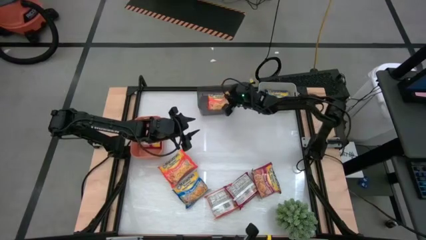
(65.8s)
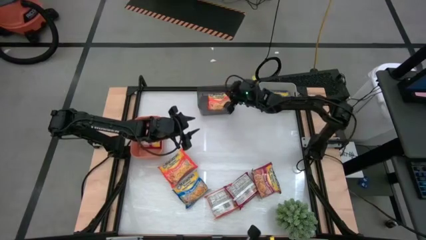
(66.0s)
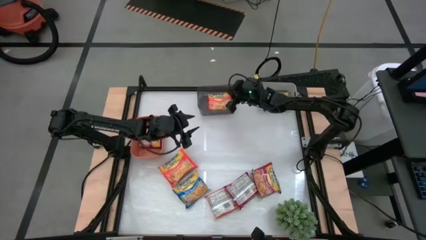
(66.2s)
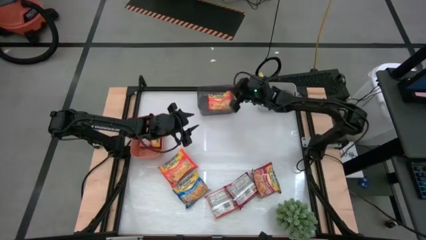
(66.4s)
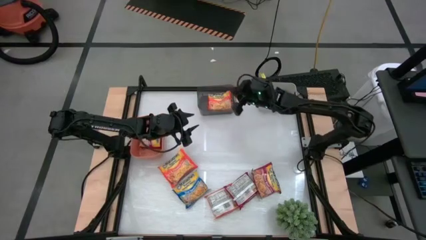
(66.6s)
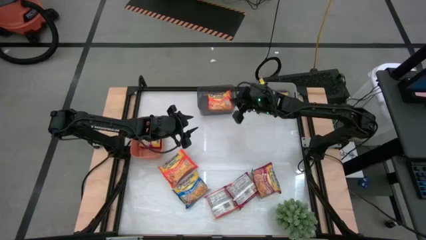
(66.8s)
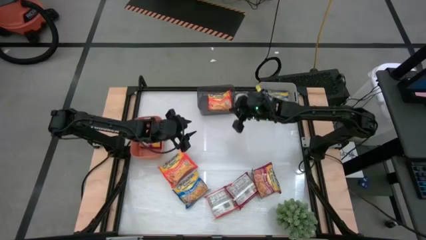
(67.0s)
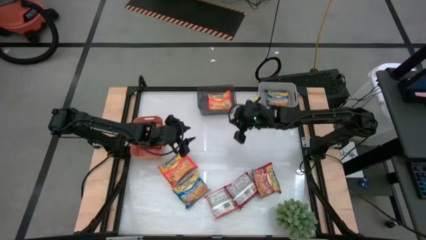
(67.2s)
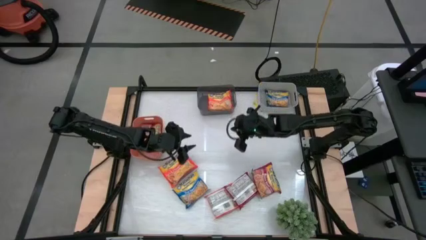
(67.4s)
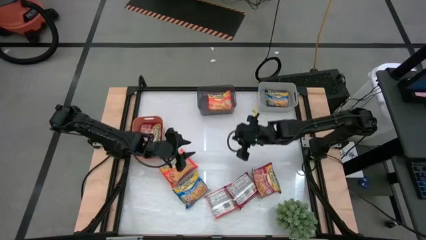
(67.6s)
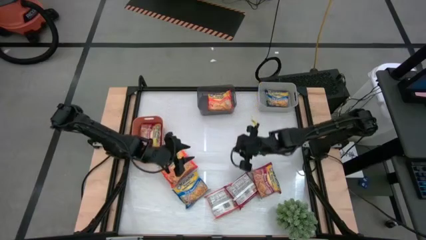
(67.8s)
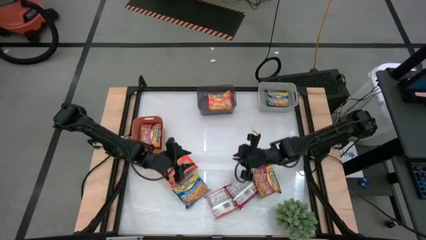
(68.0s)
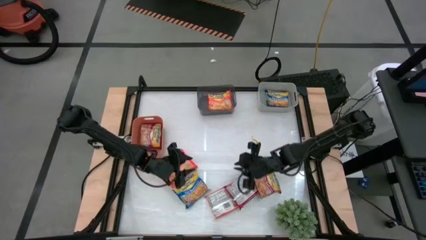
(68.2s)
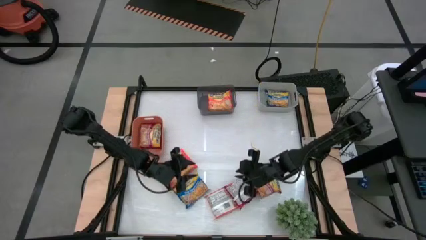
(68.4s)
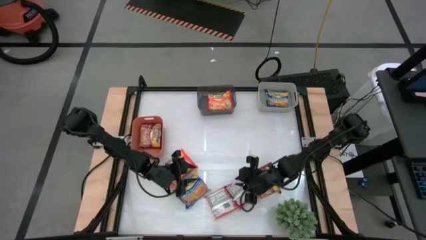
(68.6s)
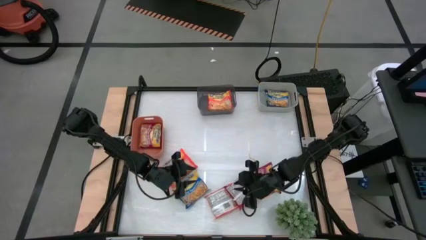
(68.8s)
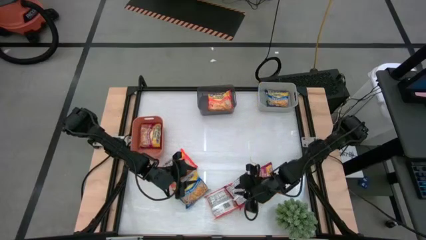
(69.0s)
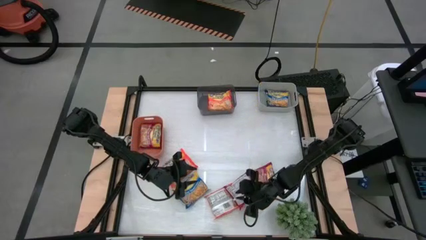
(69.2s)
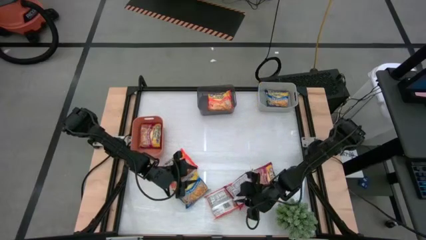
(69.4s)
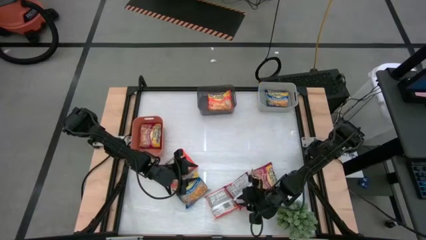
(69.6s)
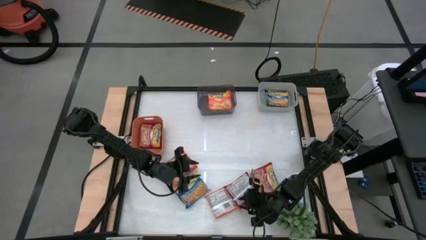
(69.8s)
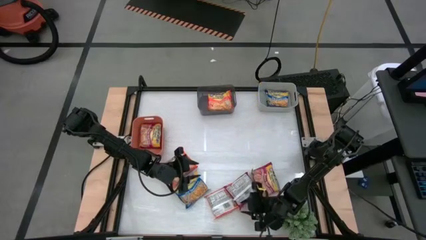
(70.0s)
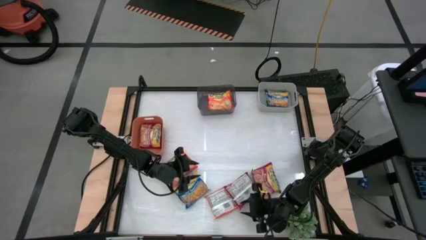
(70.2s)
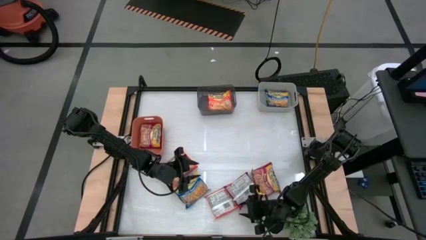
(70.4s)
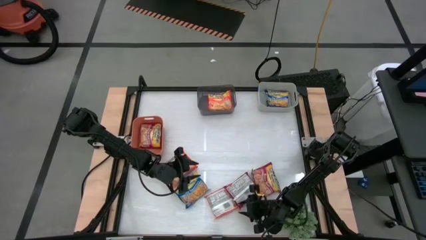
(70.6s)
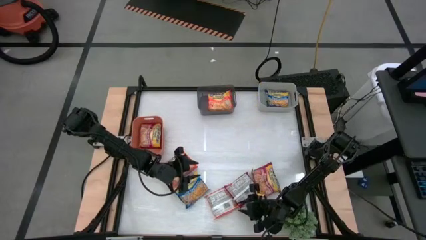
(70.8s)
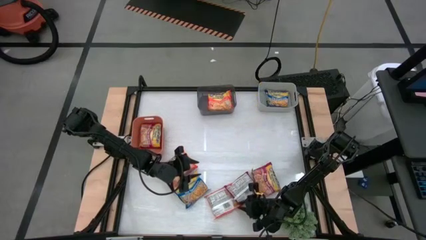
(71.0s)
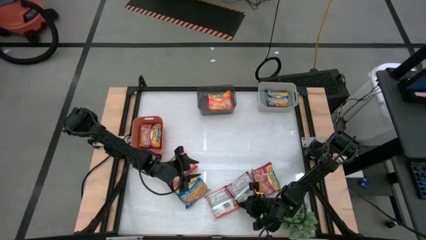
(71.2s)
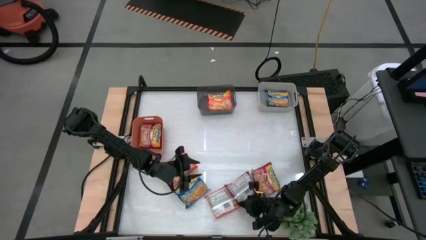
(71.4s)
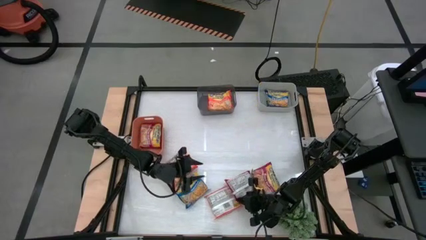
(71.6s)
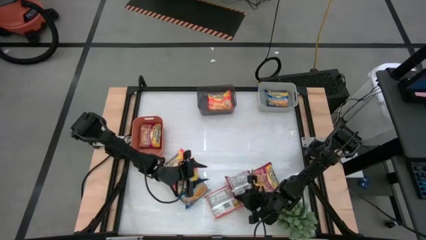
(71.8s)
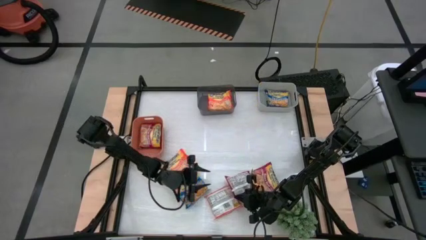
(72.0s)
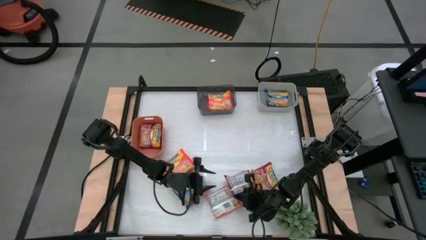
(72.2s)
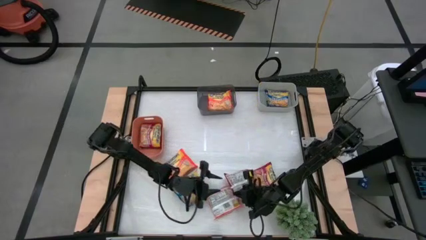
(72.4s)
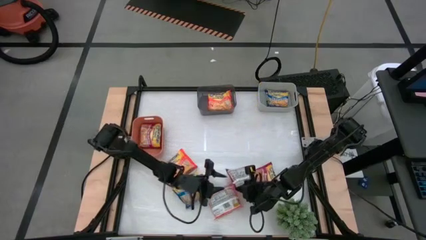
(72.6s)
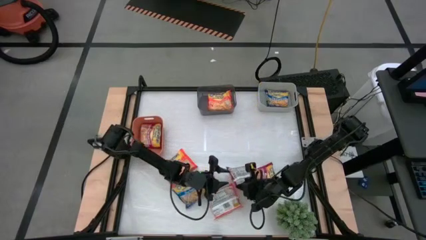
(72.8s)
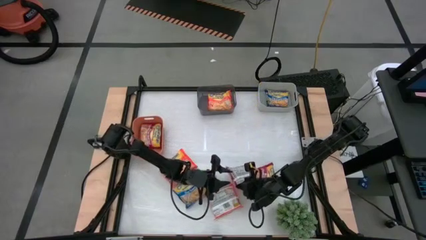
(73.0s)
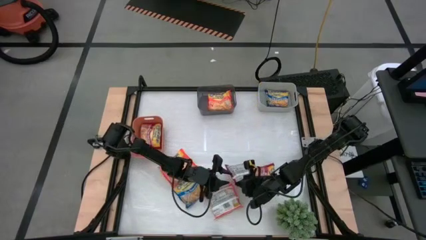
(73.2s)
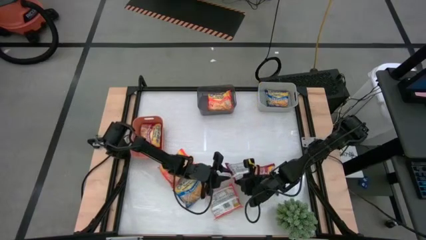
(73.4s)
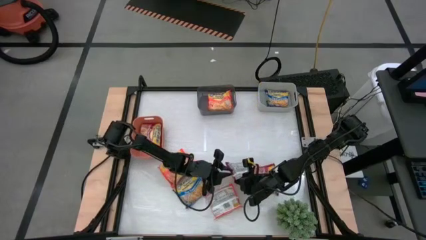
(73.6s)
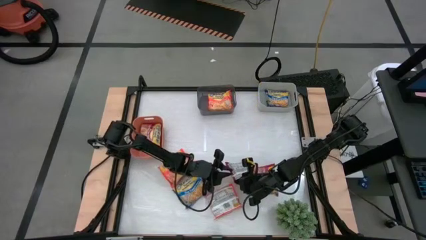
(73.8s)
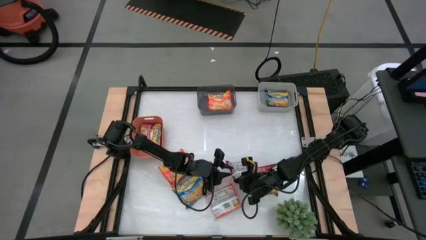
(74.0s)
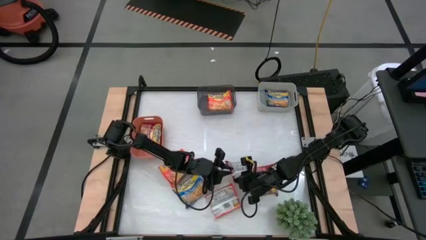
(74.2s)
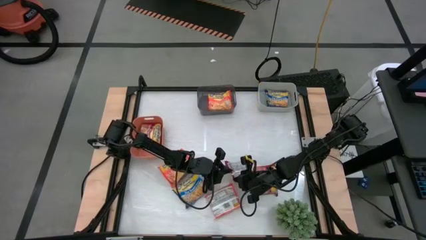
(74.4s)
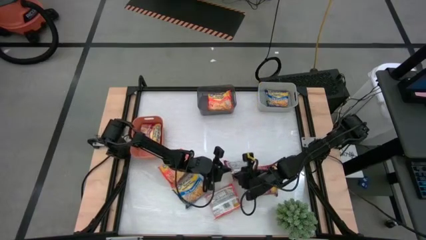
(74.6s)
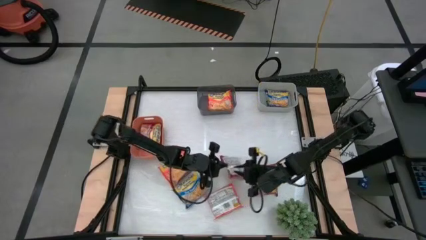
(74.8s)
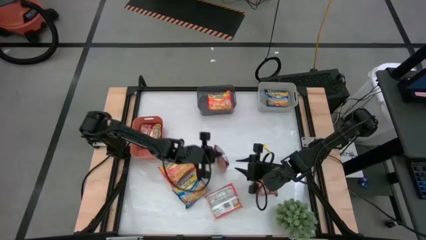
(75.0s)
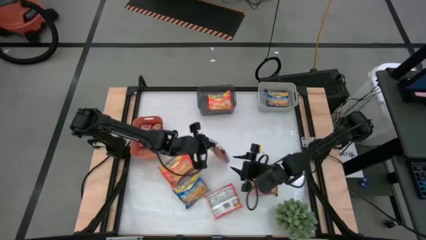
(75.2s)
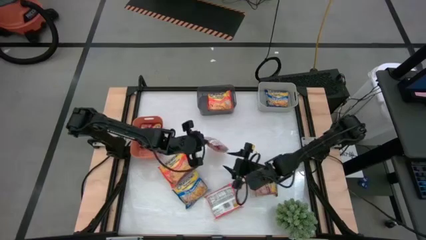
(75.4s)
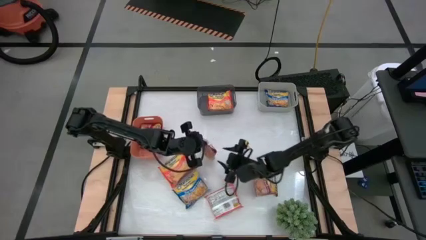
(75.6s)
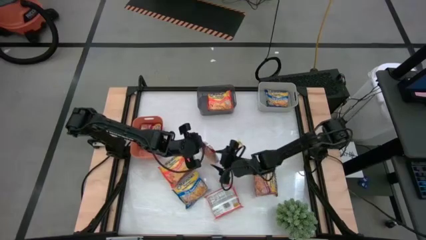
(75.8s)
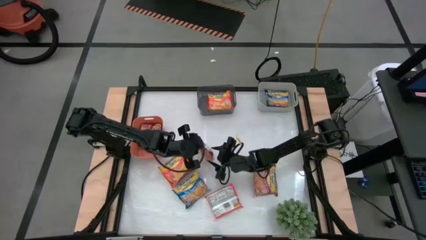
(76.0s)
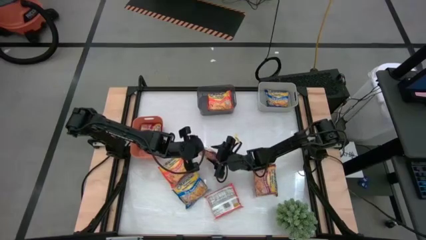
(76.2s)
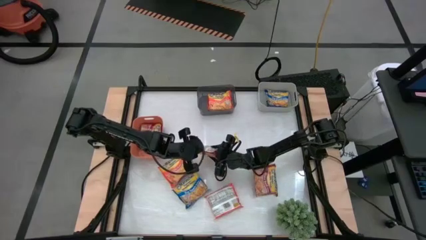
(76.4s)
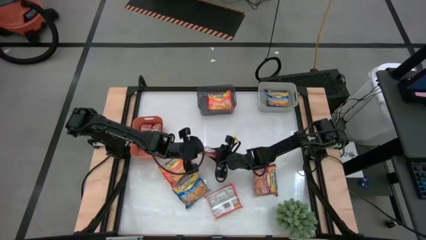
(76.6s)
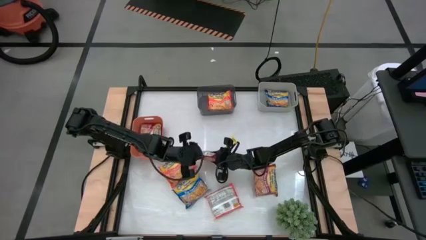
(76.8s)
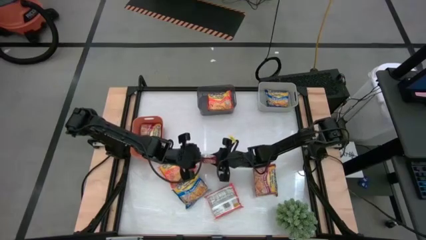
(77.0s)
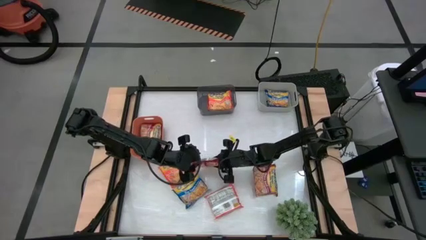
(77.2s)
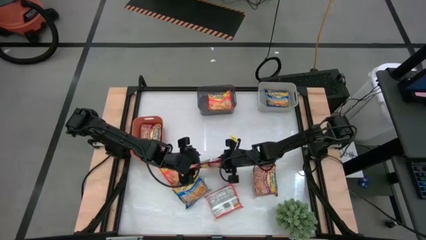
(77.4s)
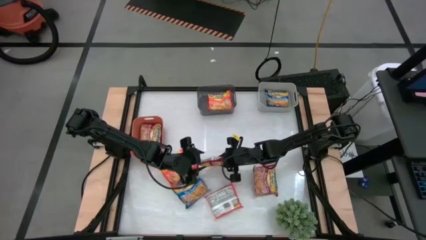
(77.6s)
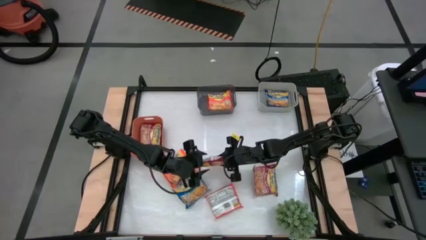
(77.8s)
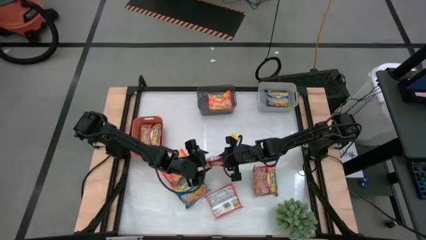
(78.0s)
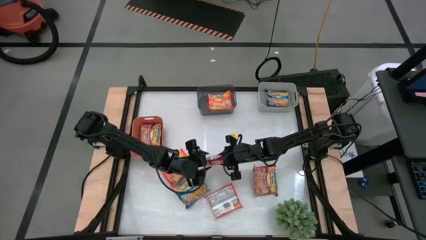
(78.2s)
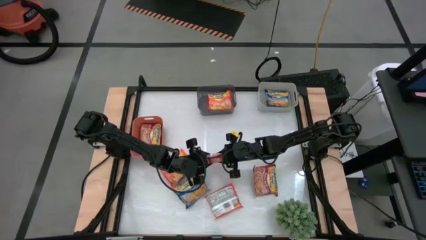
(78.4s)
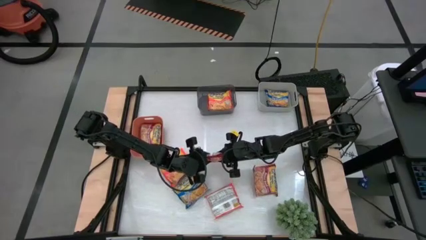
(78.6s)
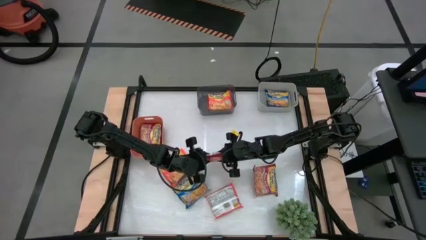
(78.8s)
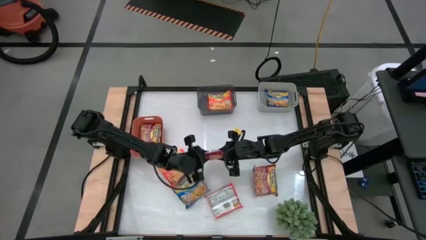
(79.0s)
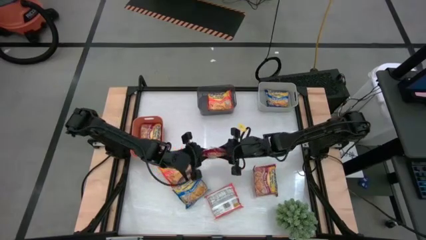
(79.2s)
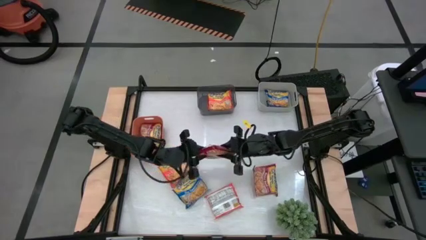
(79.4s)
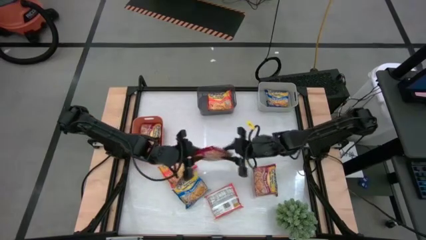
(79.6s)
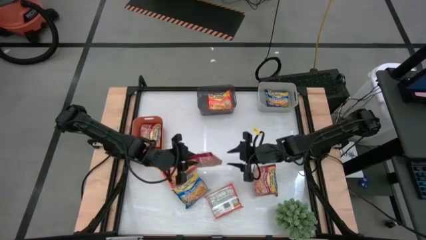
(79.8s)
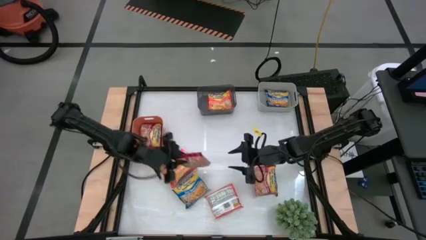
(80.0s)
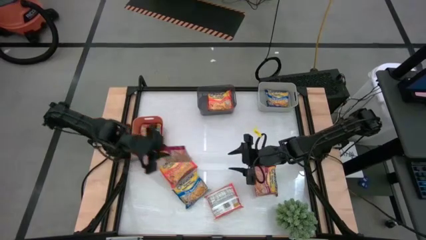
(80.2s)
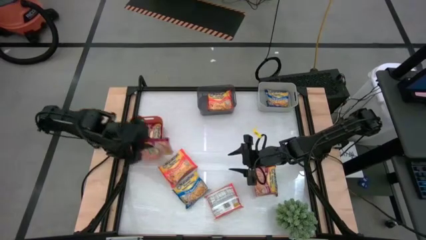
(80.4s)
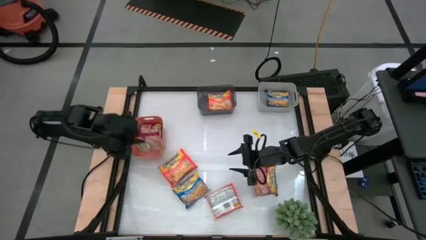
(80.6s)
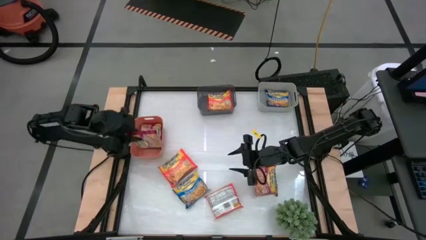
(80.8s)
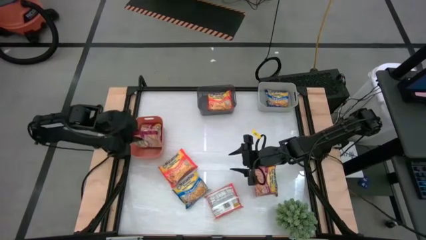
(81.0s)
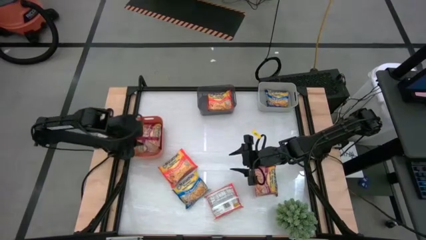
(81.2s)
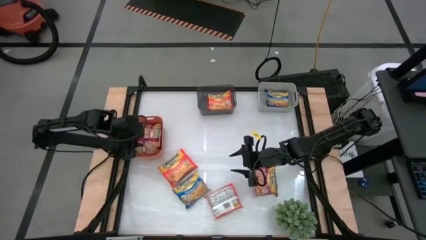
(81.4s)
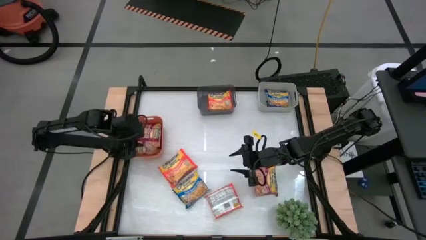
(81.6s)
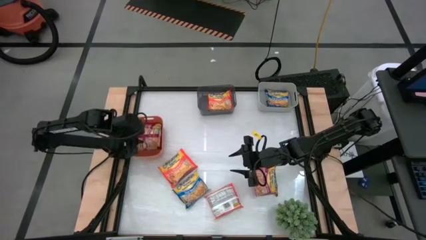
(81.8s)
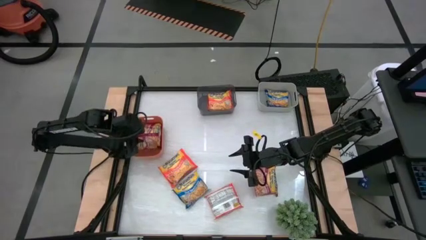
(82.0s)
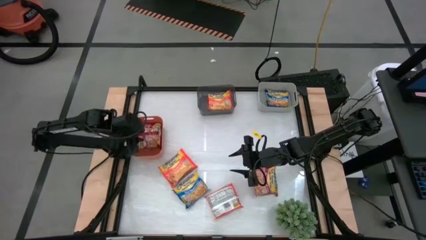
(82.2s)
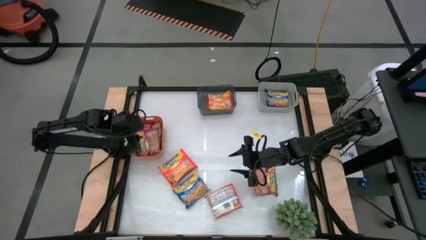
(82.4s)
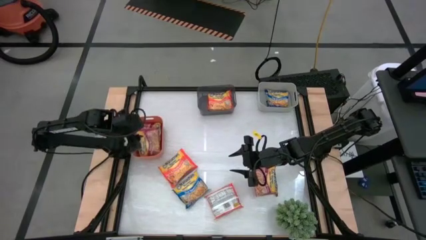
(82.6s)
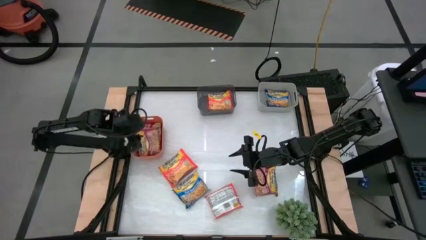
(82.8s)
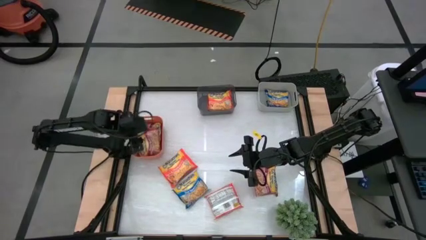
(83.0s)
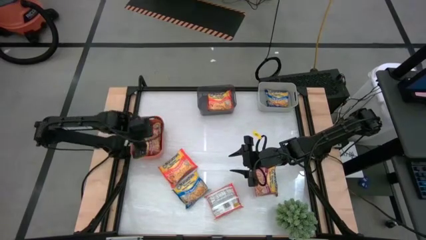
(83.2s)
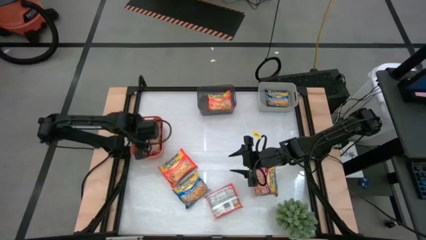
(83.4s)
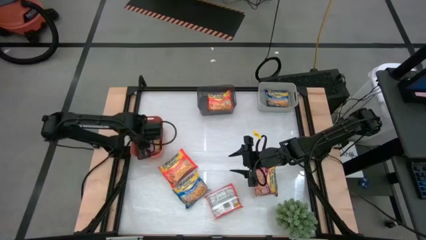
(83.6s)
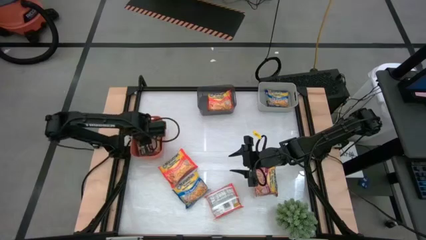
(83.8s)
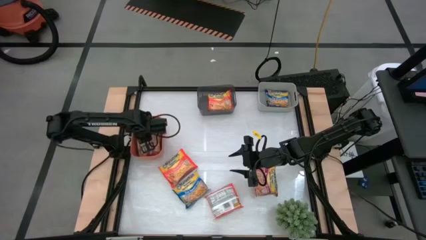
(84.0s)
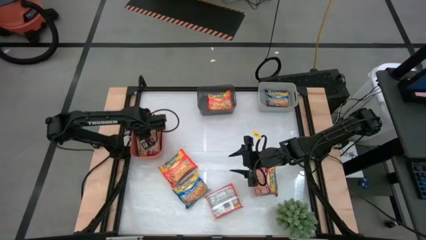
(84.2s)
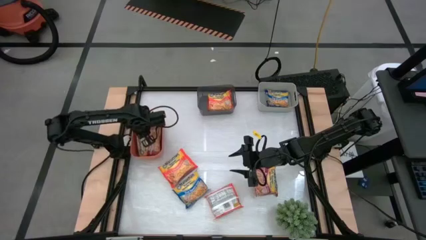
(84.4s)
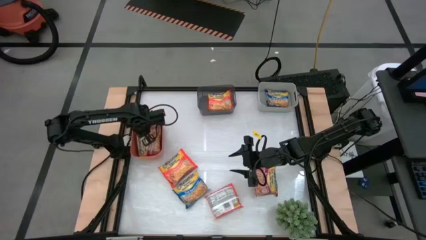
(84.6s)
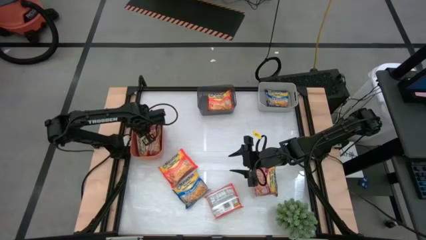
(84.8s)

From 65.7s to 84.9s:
Task: Sort Maruchan noodles
Put the left red noodle pack into the orange bin
